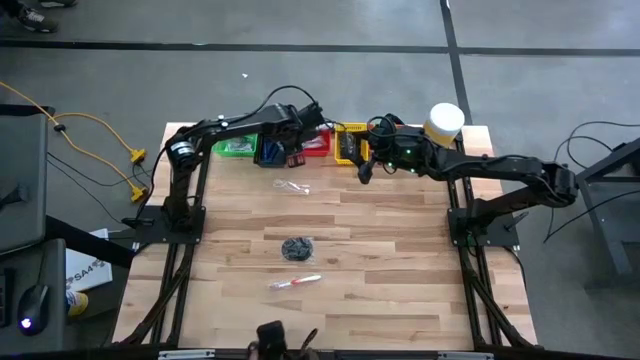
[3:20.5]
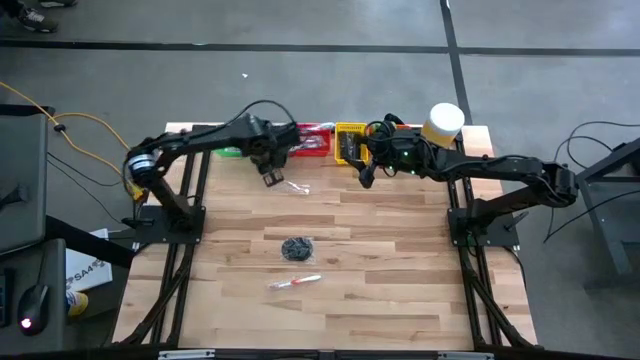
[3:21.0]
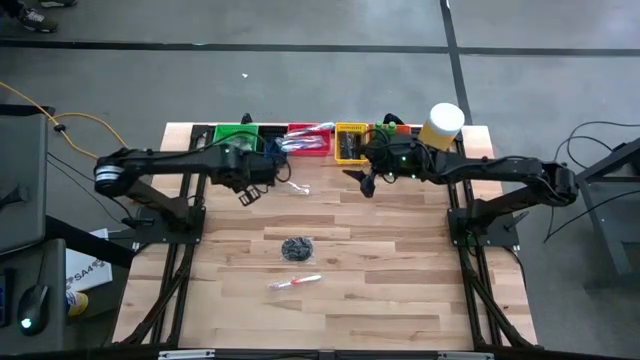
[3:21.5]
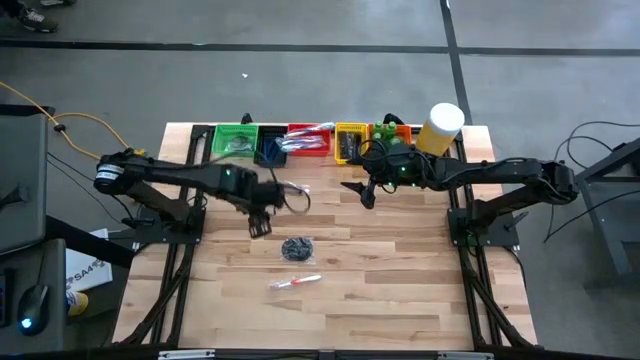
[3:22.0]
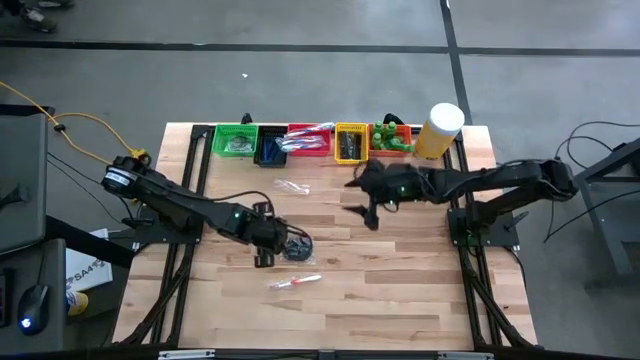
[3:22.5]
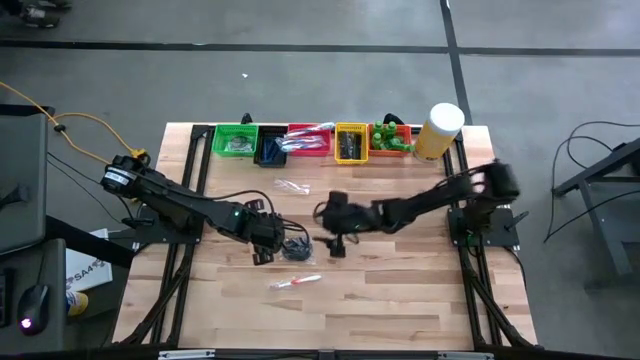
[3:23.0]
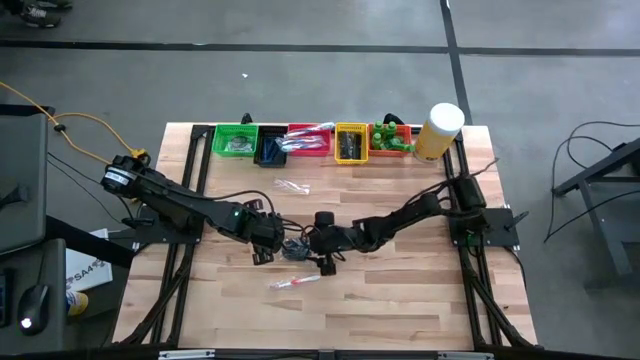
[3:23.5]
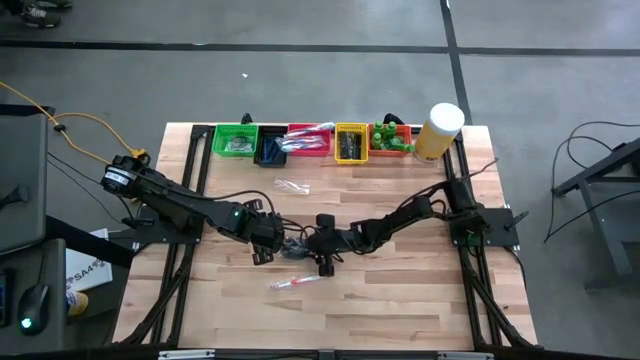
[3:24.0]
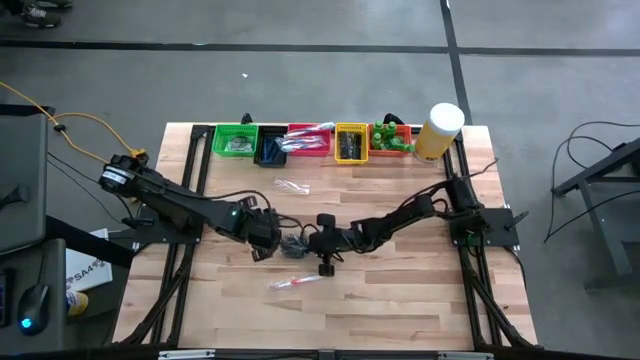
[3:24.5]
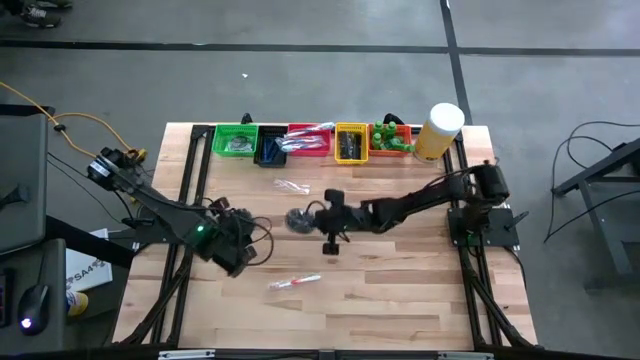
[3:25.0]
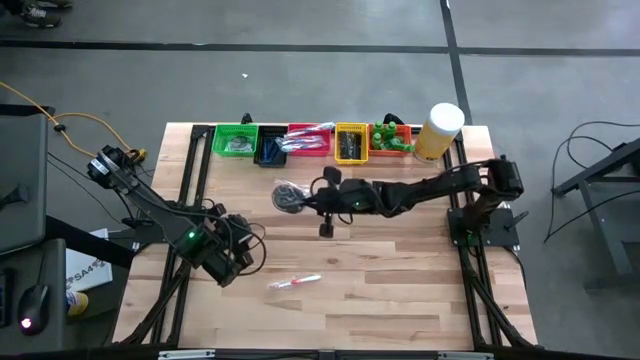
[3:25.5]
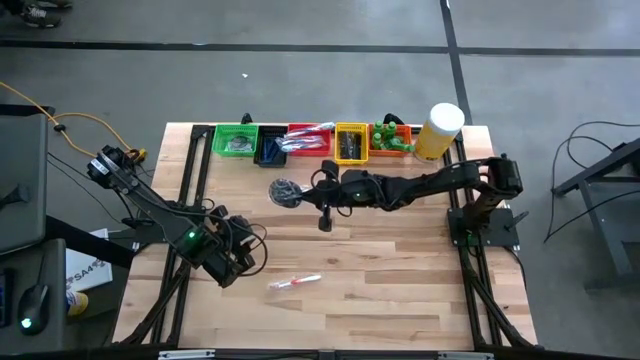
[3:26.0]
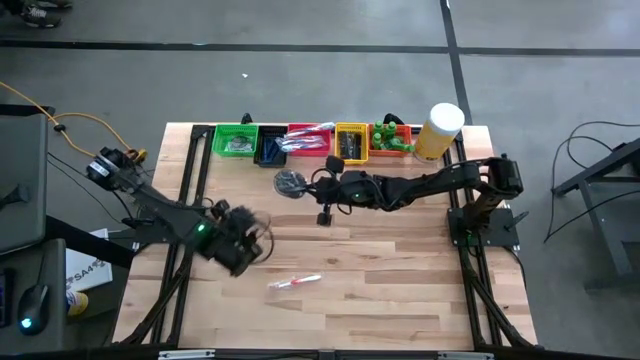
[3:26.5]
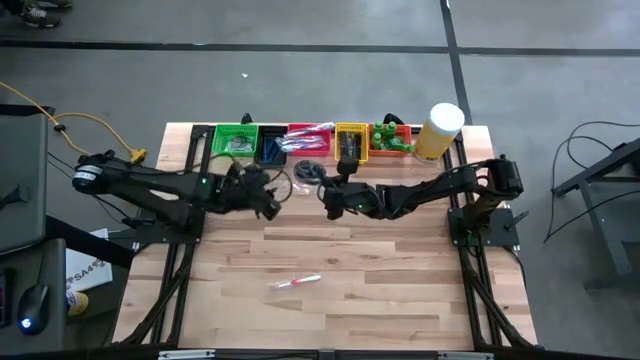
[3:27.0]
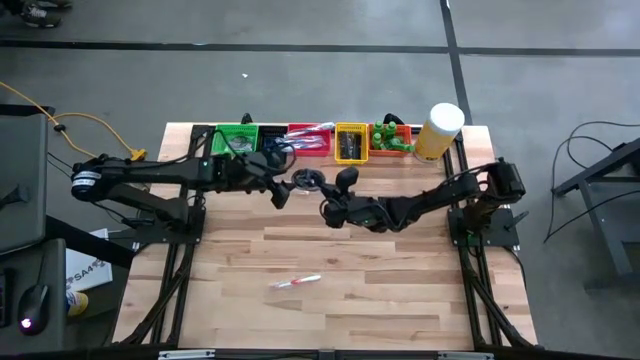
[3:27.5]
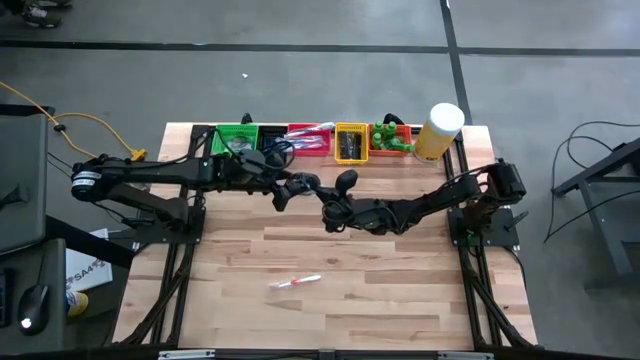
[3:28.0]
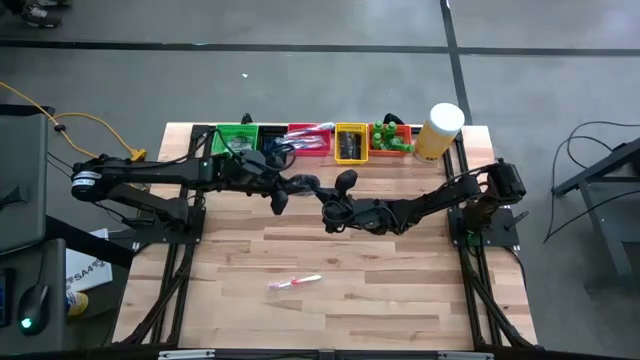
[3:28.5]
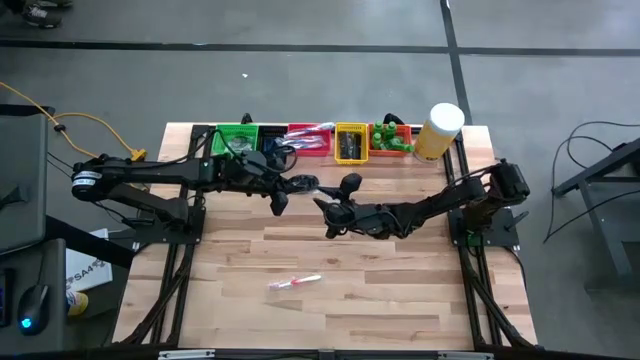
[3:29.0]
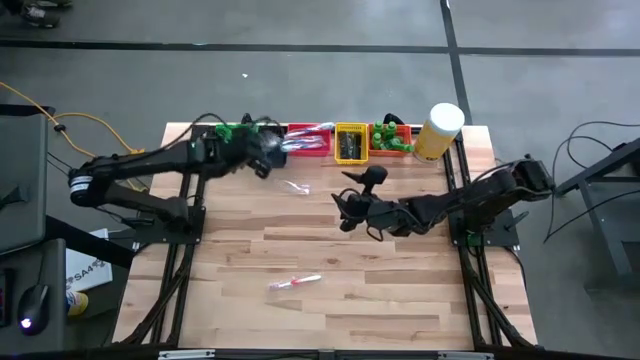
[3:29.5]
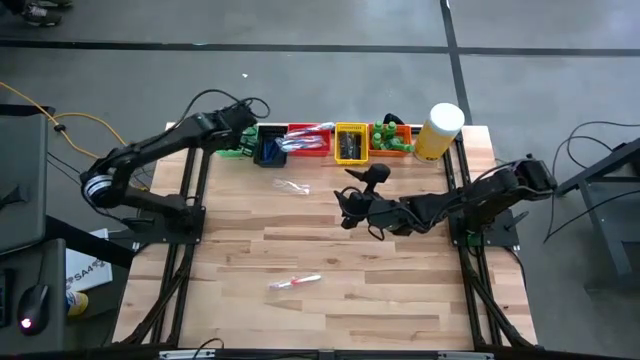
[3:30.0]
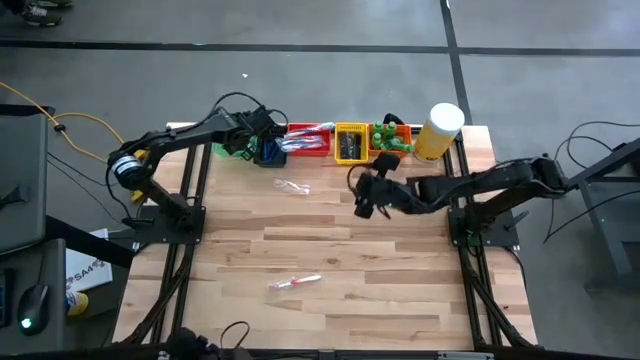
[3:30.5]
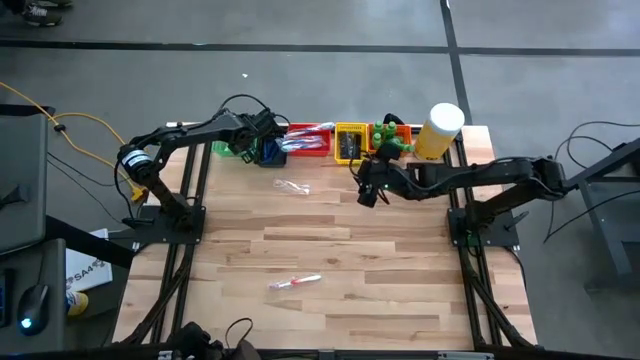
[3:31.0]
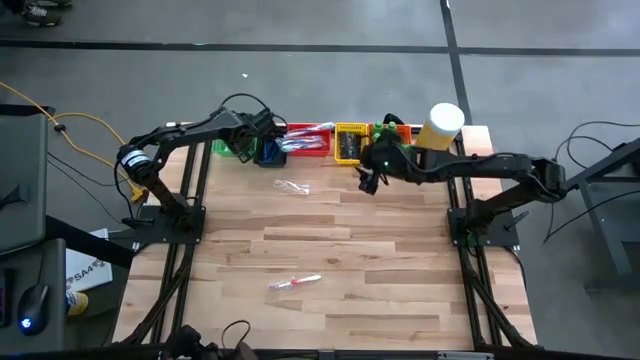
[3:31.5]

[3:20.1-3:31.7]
Task: Pick & Place Travel size toiletries
Put the hairbrush into the green basket

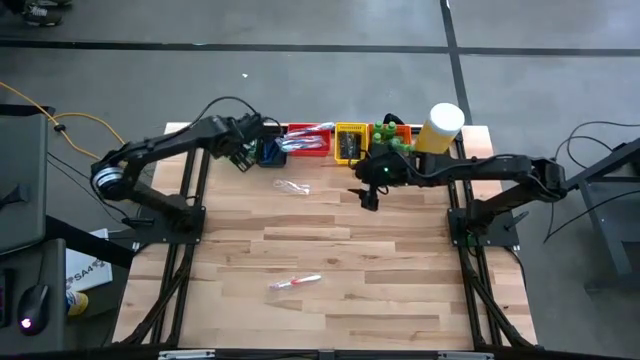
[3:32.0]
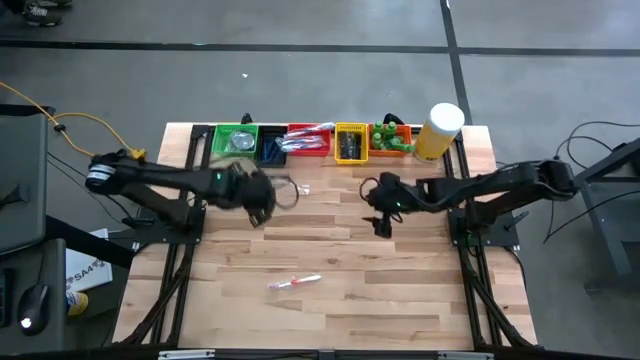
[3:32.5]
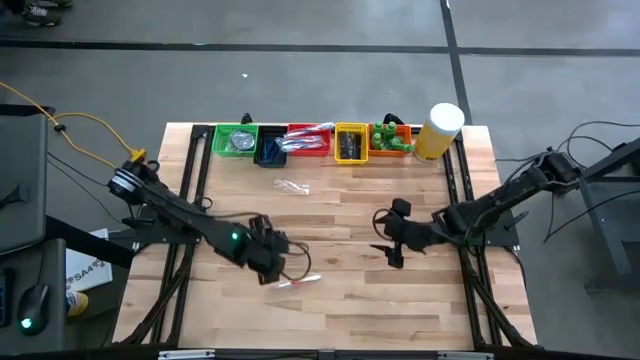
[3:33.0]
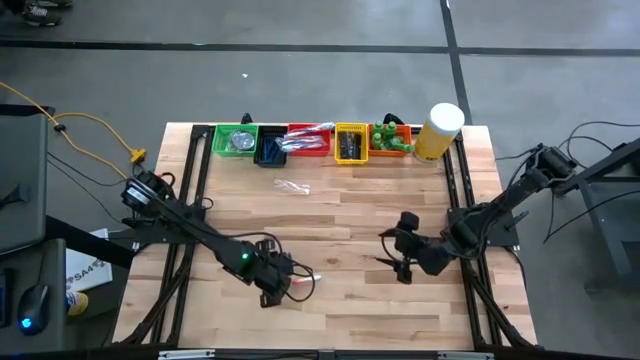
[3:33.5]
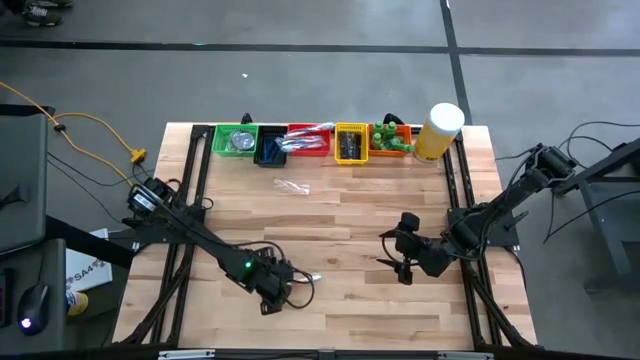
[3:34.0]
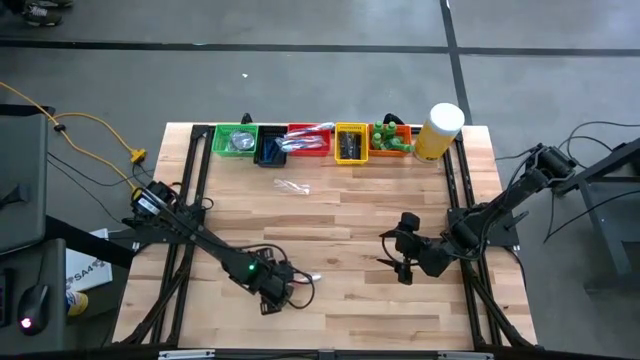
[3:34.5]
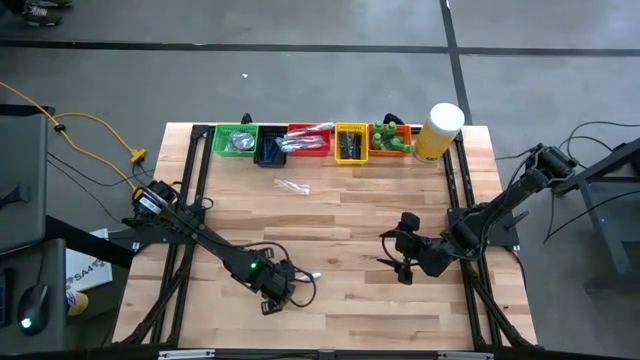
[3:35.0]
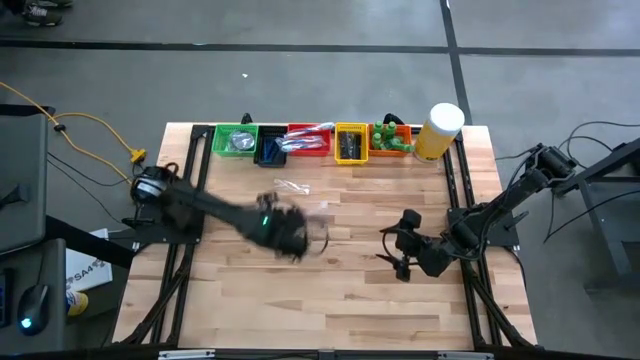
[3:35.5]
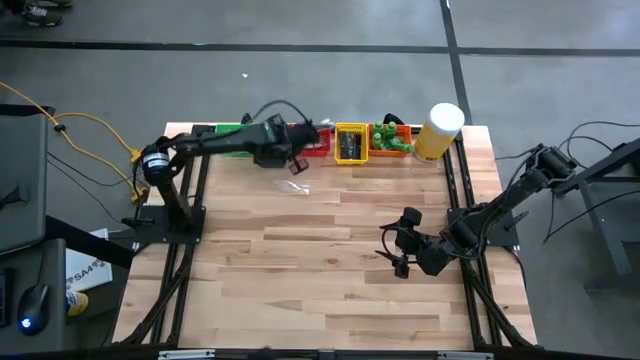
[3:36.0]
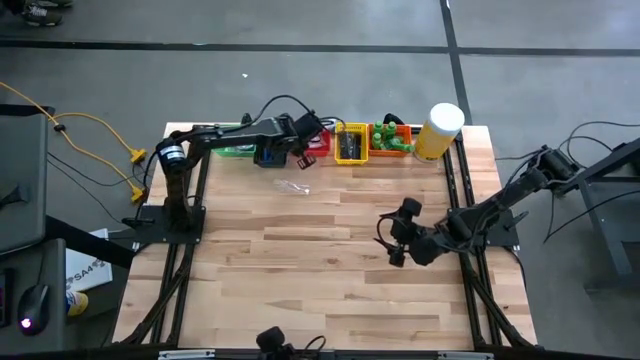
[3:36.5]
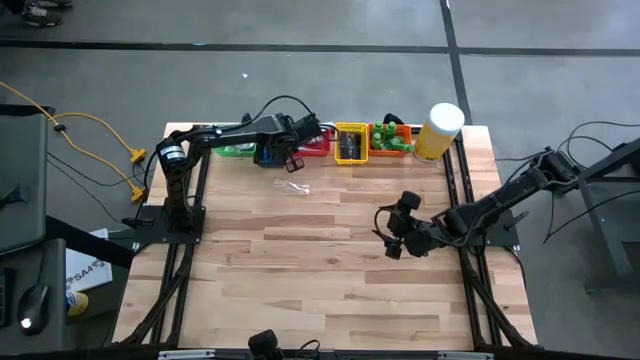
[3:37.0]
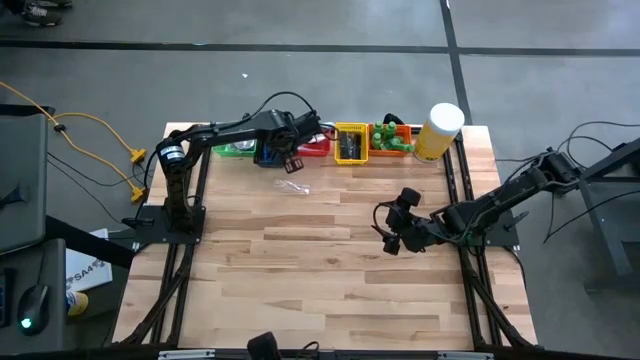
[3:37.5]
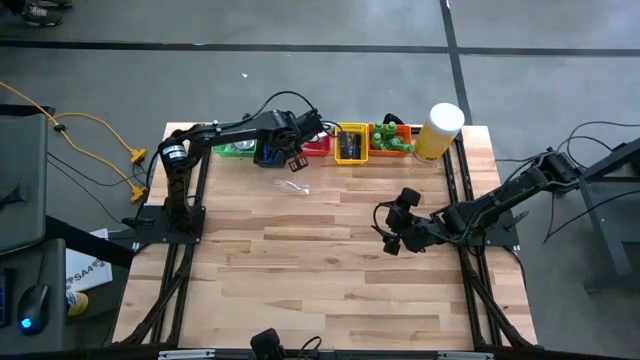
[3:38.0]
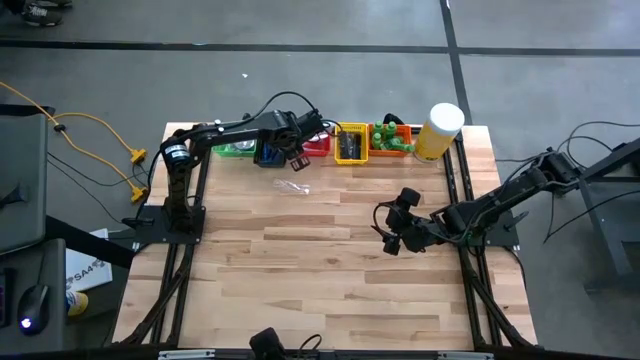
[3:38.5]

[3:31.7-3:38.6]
Put the orange toothbrush into the red basket

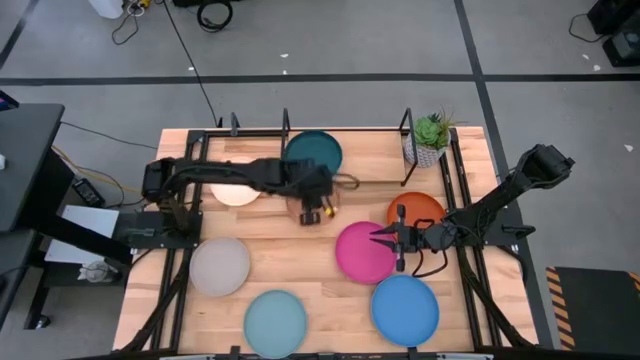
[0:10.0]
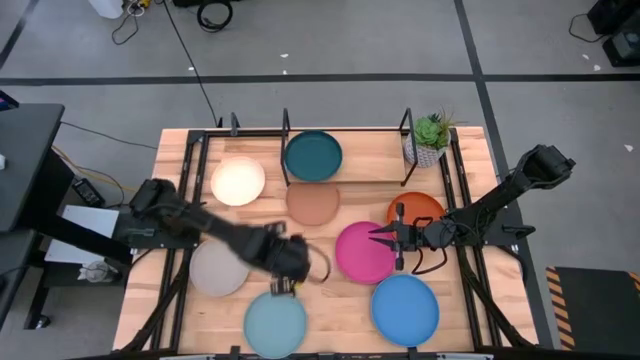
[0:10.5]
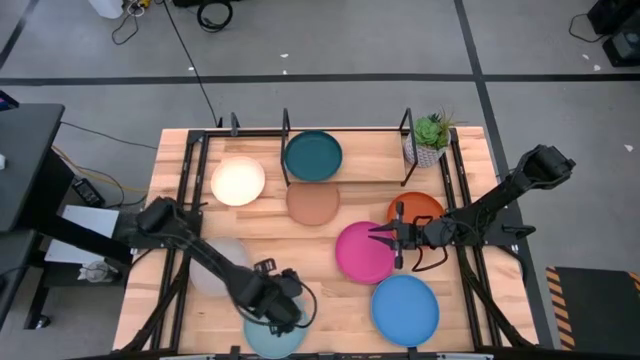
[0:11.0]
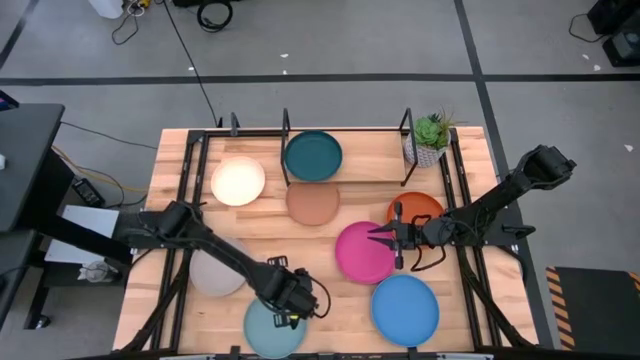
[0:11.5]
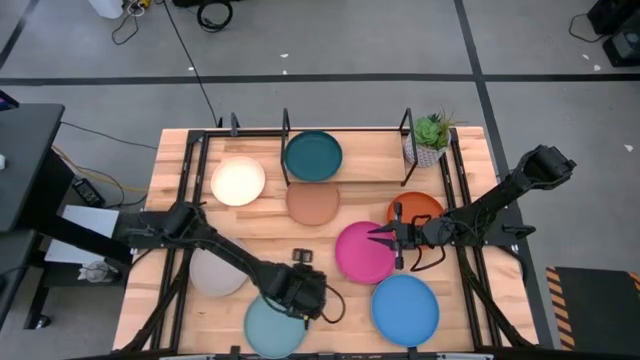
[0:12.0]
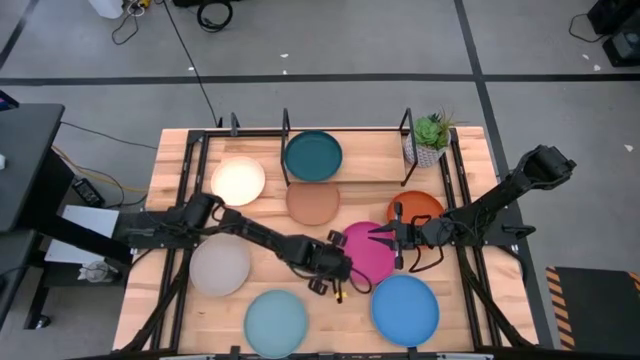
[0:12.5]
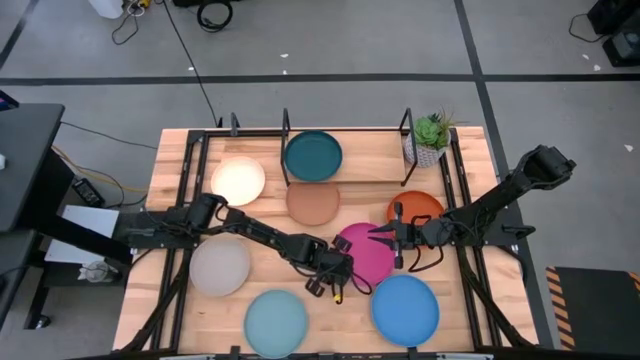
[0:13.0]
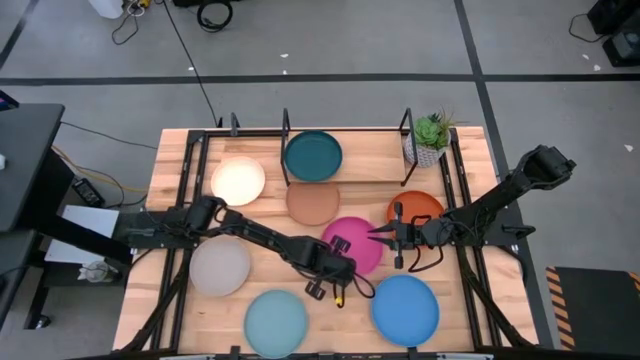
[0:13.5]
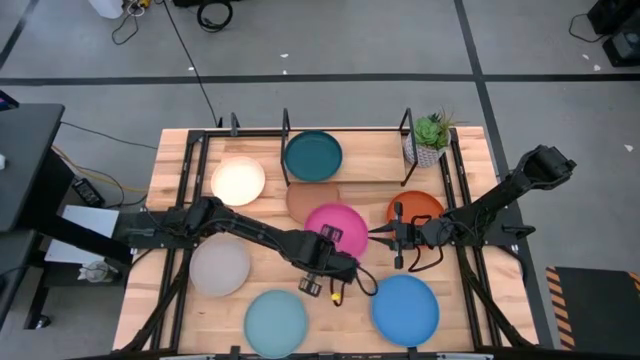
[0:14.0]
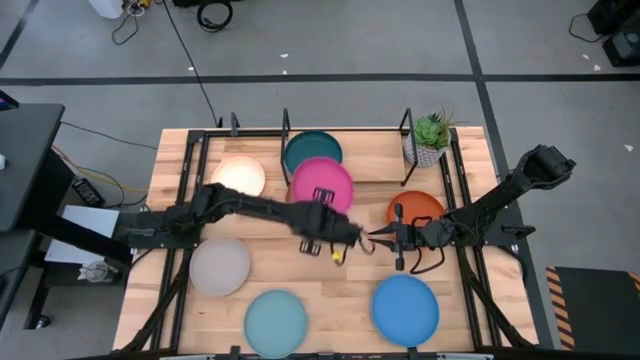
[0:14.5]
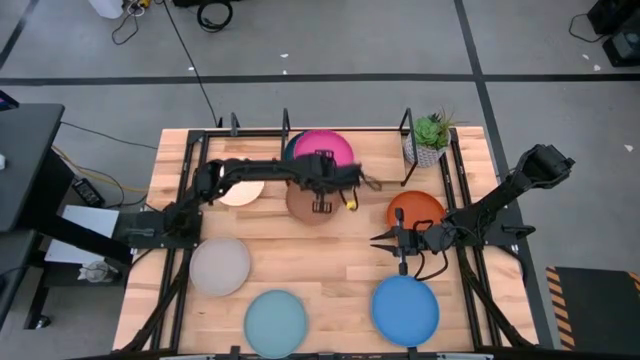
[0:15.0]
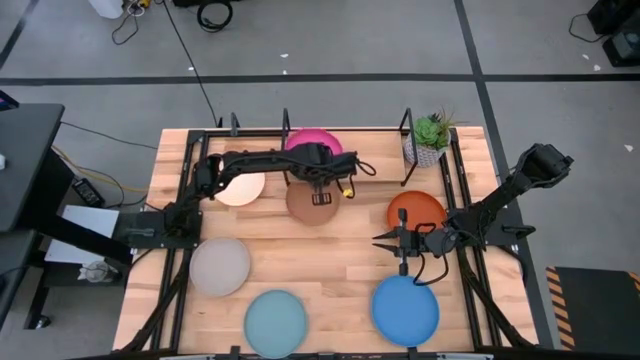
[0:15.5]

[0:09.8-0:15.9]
Task: Place and stack plates onto a shelf
Stack the pink plate on top of the dark blue plate on the shelf
